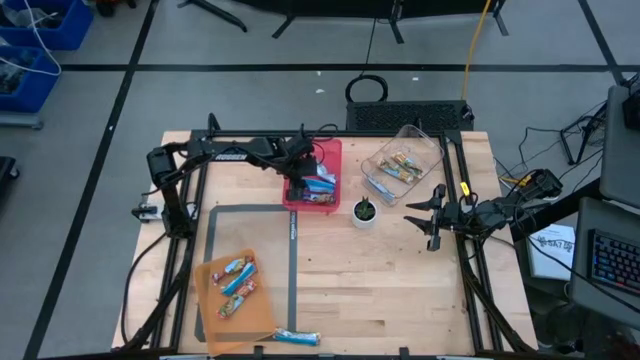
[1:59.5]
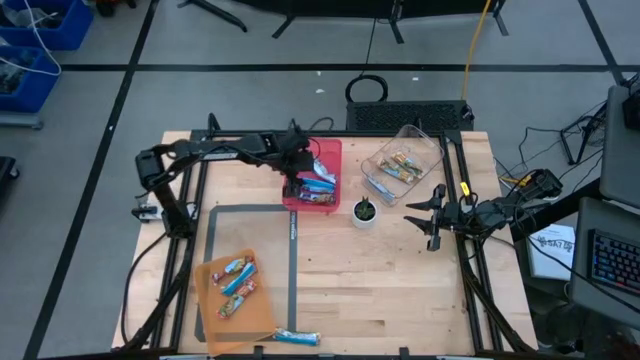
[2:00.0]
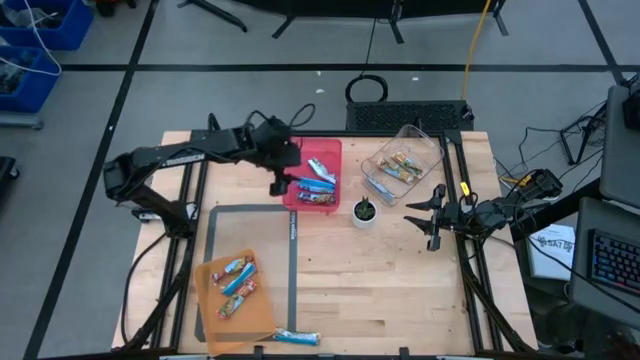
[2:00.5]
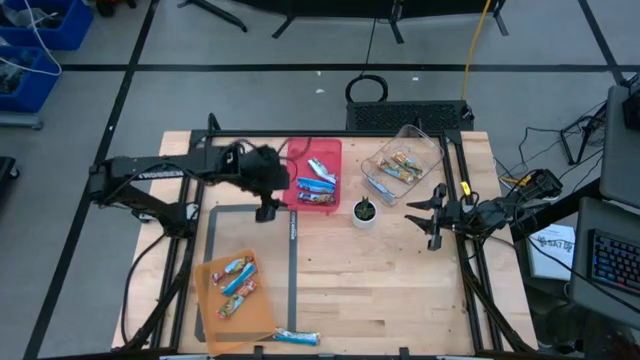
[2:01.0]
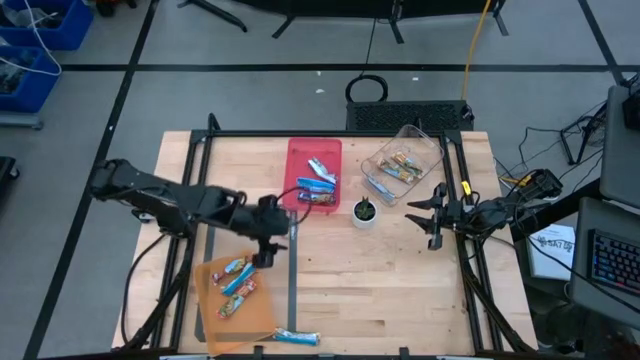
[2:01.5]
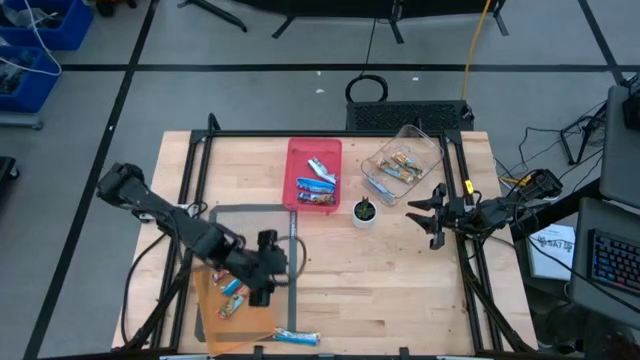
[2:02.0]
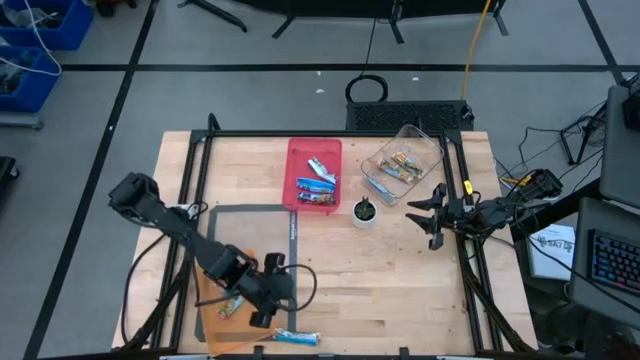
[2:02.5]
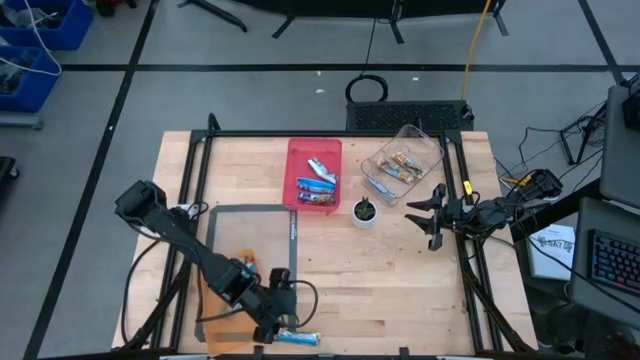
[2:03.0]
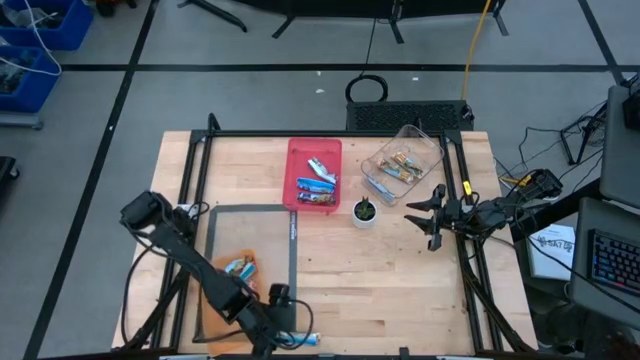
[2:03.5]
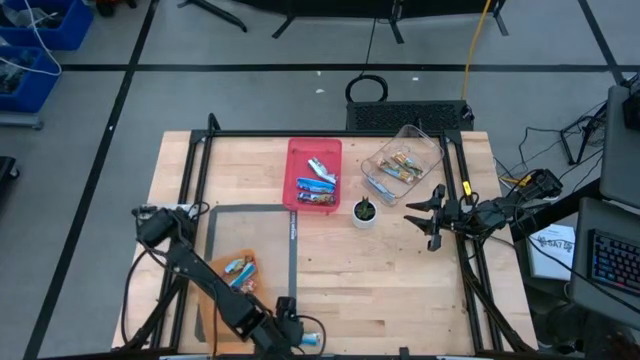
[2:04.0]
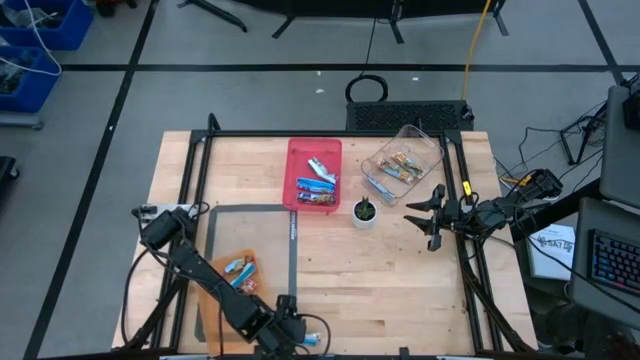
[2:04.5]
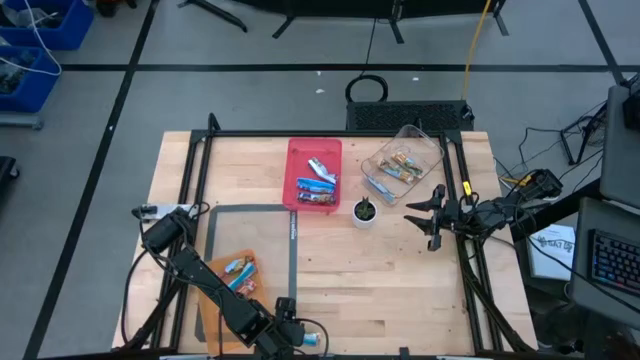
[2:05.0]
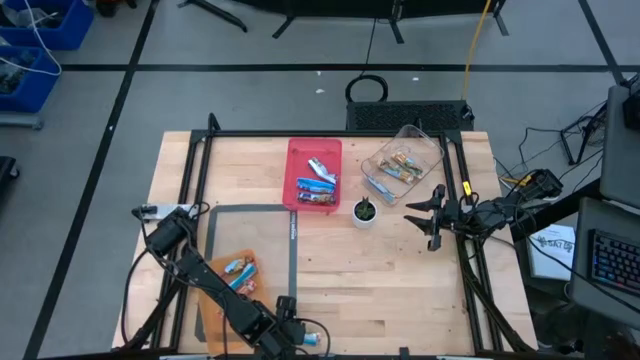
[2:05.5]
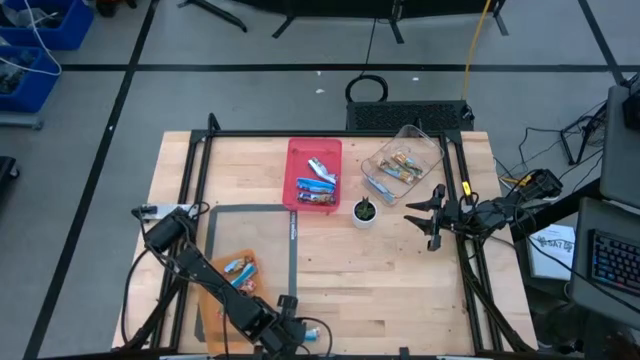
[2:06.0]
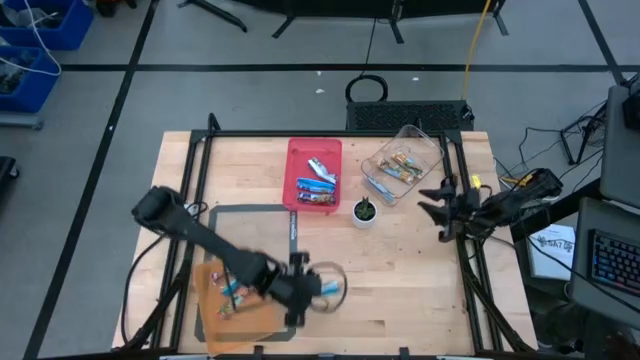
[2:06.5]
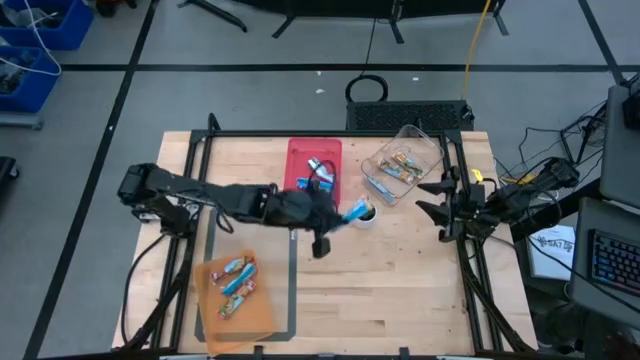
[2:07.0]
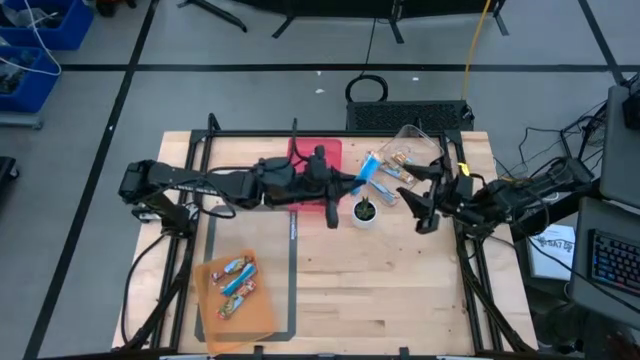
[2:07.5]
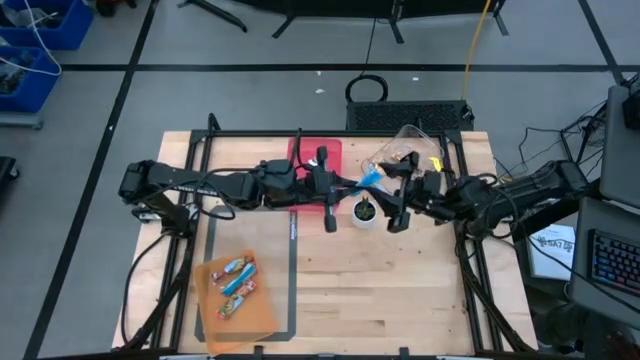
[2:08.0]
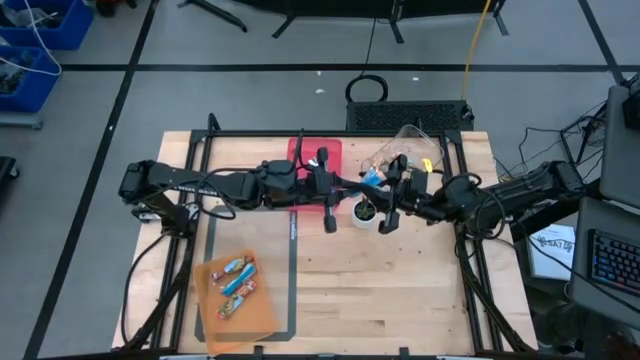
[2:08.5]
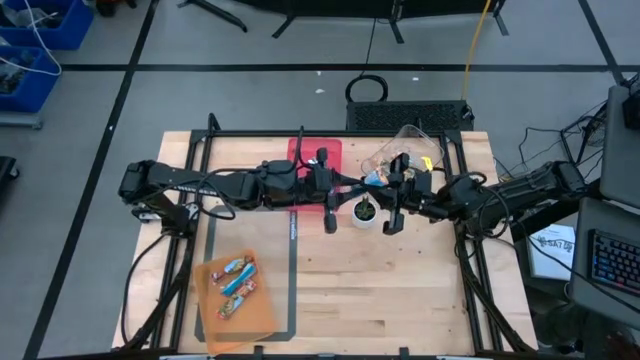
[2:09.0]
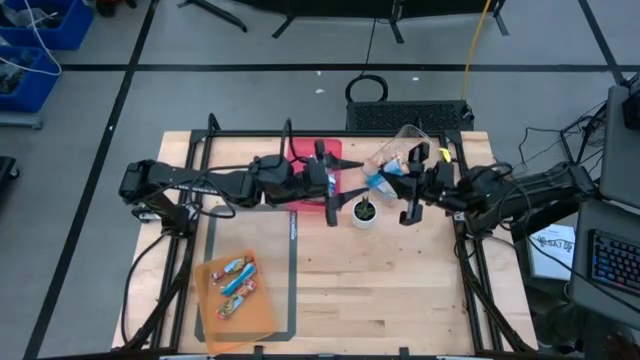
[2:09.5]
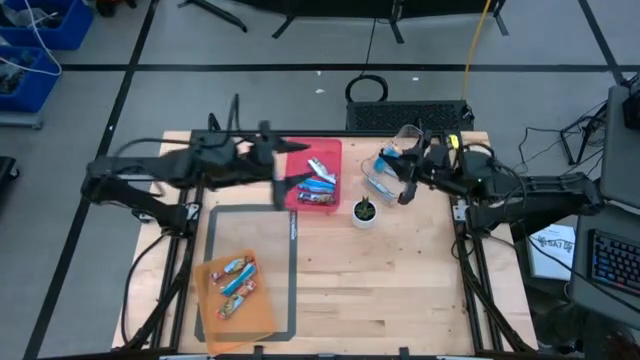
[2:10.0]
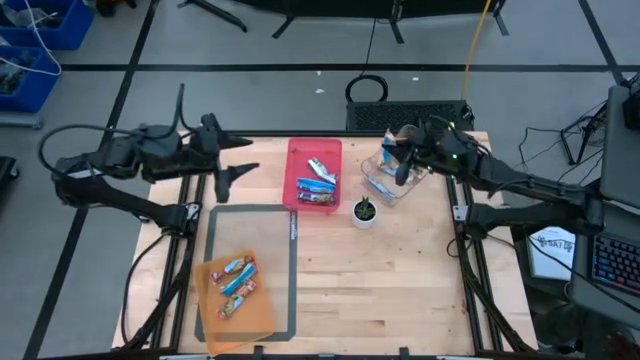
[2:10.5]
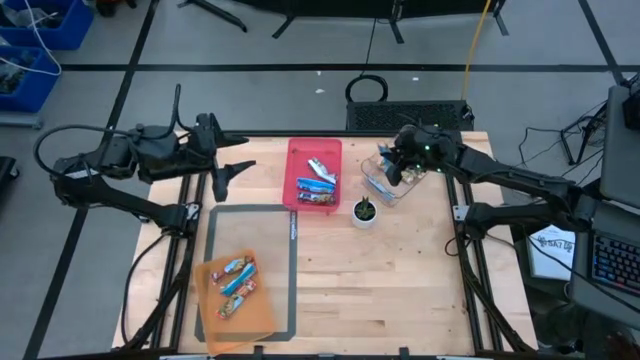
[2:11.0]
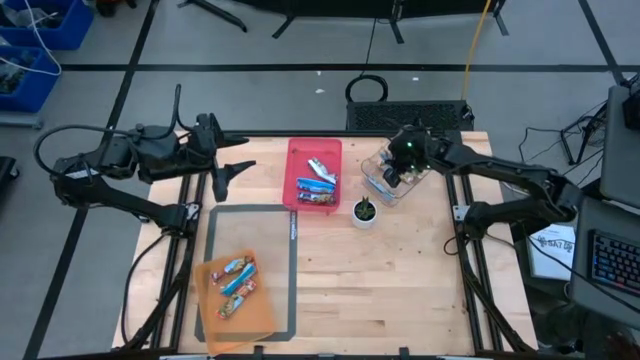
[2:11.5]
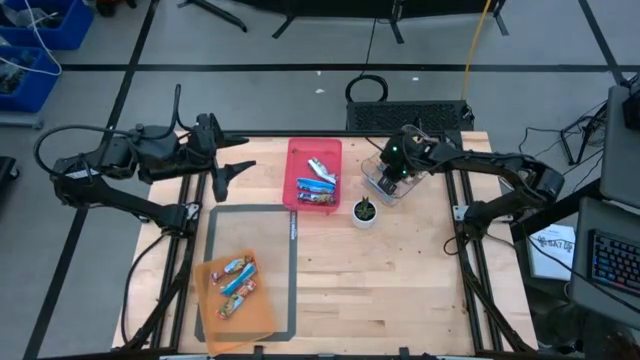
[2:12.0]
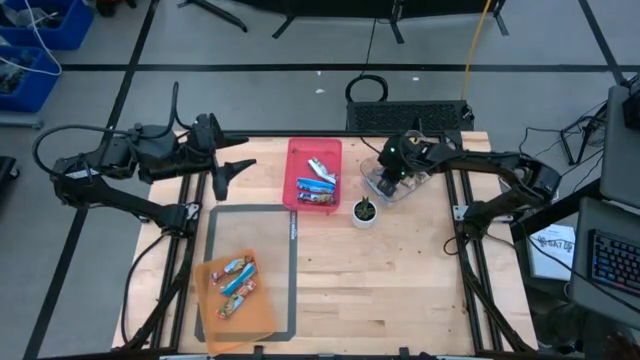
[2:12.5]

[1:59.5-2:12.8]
Task: Pick and place Granola Bars by type
Put the orange granola bar into the transparent bin

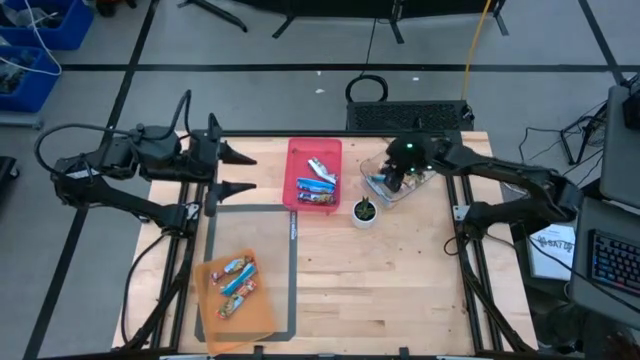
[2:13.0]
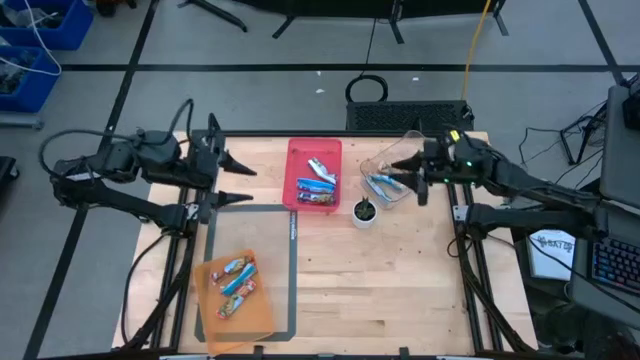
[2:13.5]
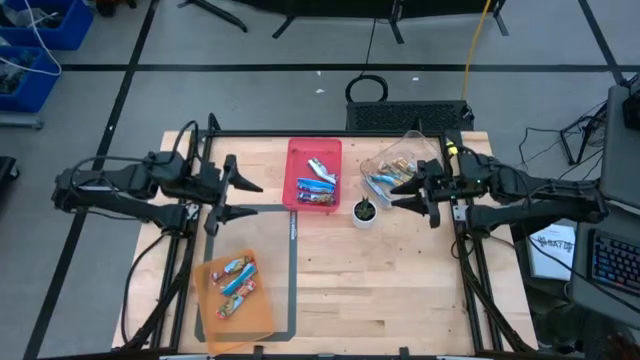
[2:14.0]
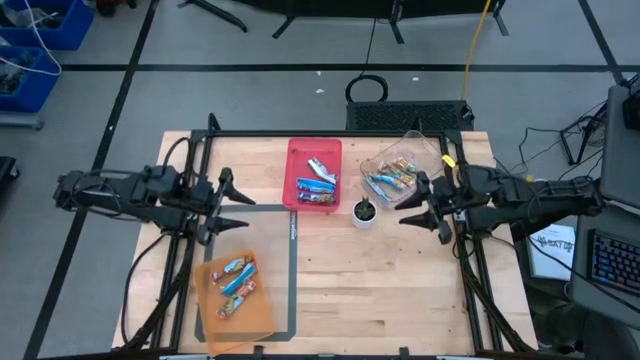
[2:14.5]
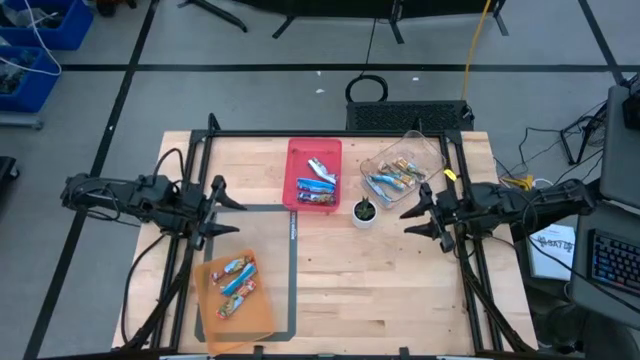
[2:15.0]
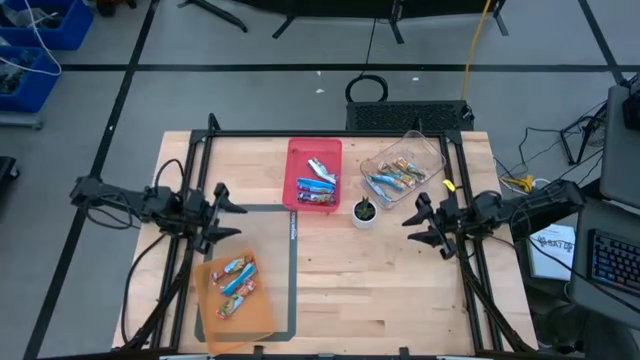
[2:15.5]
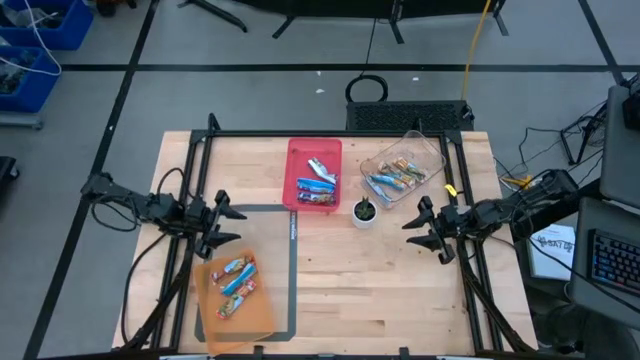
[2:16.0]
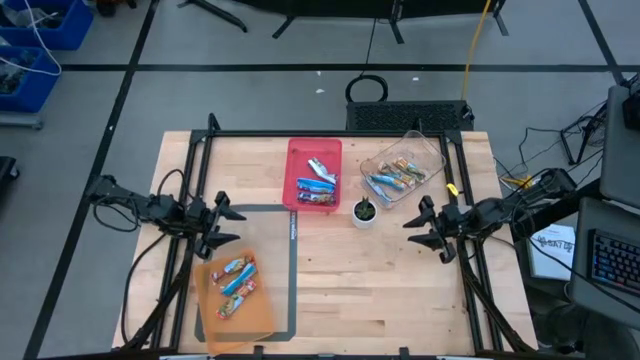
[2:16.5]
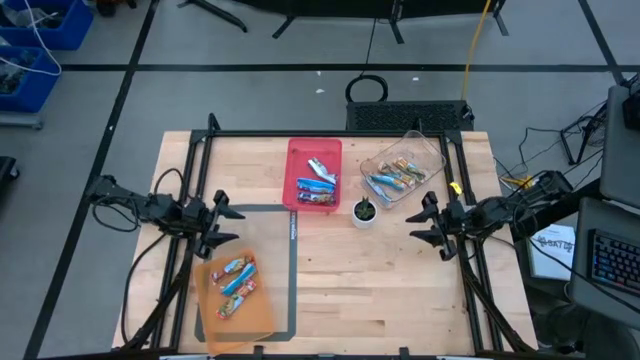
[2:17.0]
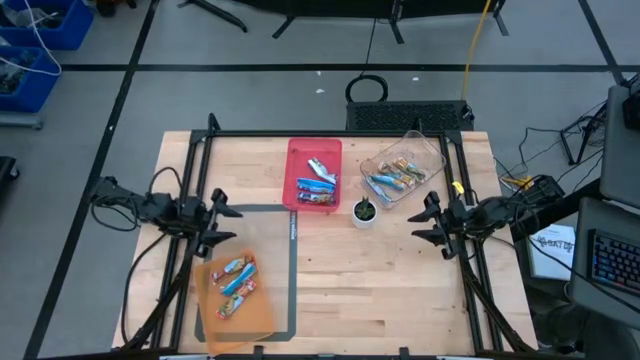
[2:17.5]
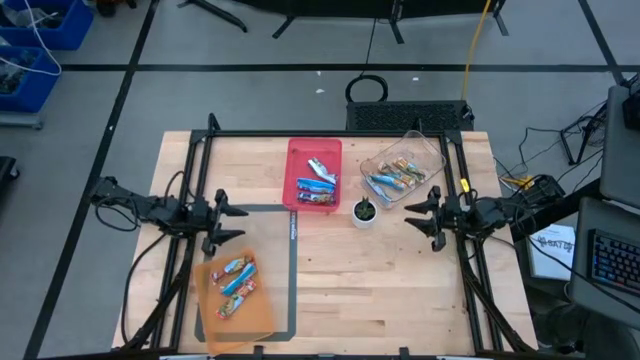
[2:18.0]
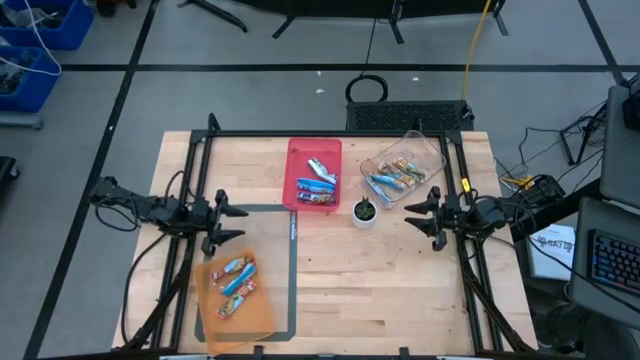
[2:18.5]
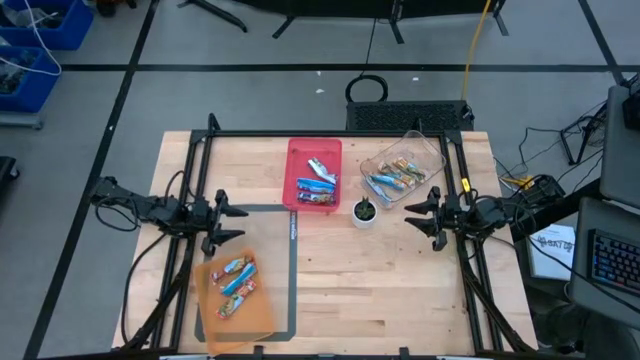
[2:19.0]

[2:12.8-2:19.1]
Return to Home Position

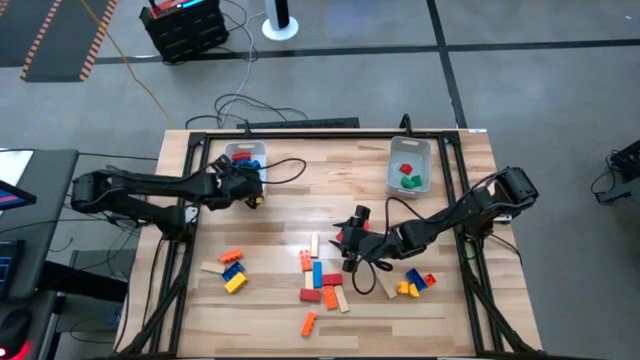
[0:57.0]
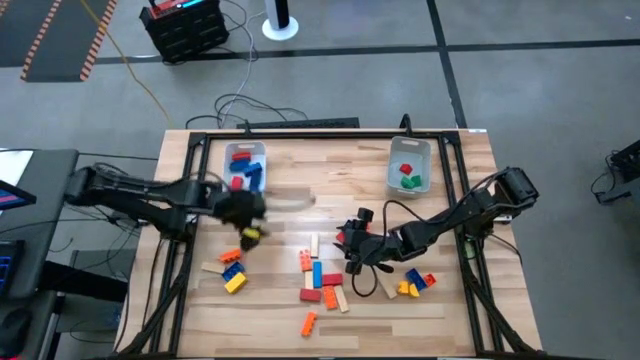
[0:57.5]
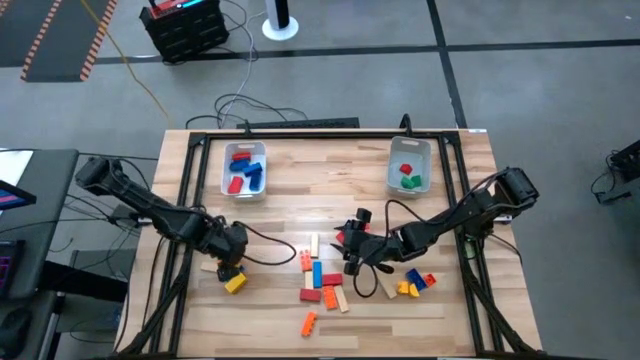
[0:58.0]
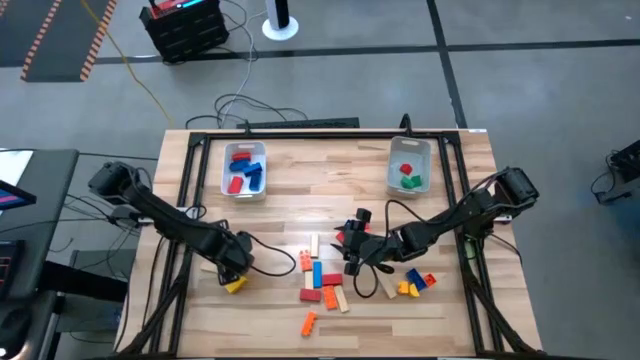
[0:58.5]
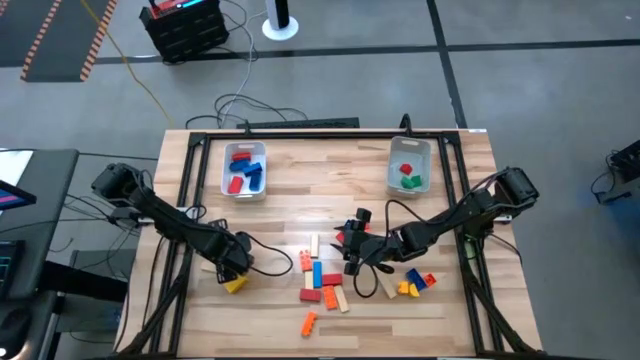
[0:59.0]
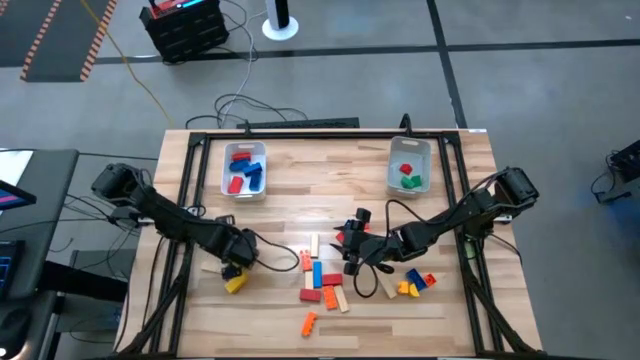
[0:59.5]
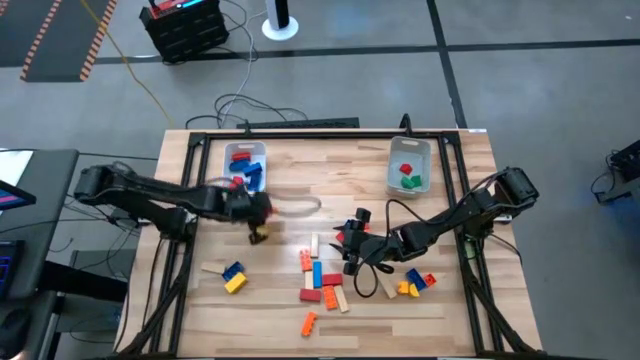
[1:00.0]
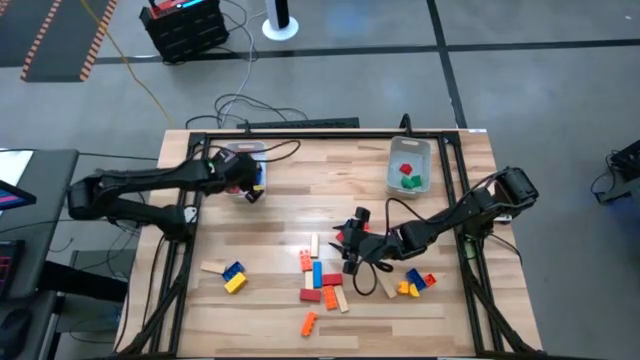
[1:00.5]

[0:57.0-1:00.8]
Task: Sort blocks by size
Put the large orange game piece into the white bin
